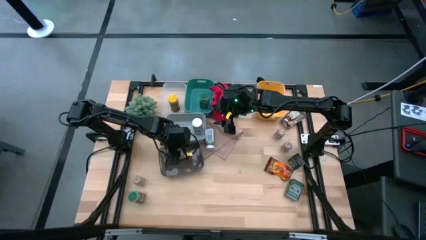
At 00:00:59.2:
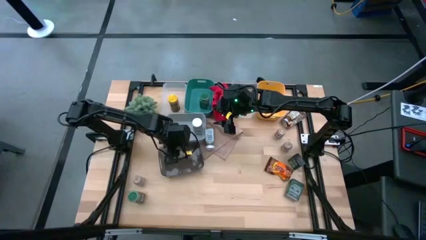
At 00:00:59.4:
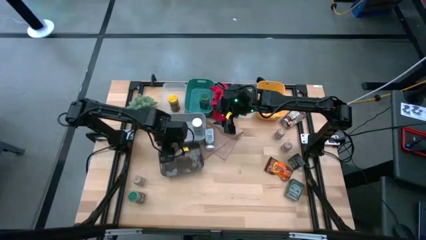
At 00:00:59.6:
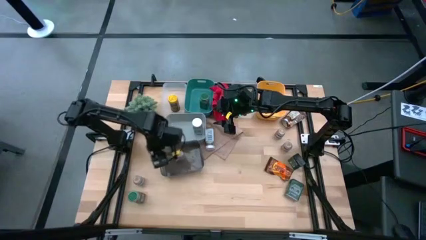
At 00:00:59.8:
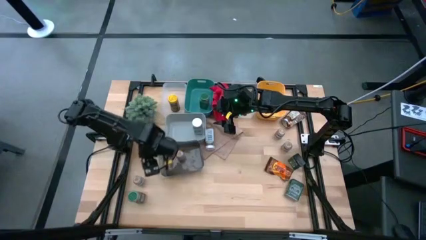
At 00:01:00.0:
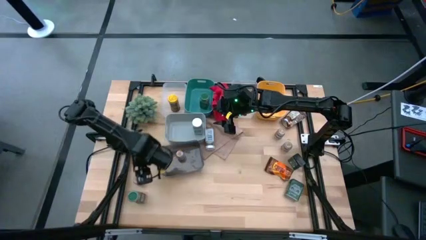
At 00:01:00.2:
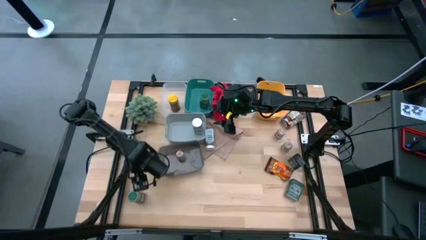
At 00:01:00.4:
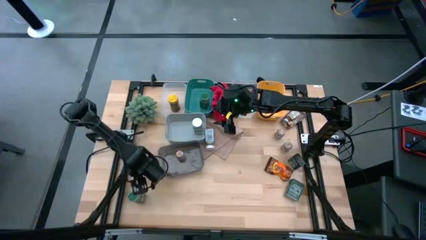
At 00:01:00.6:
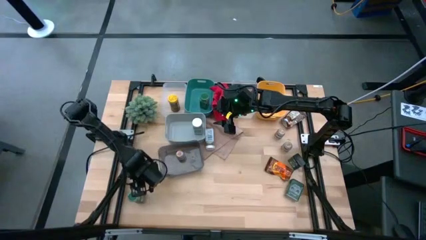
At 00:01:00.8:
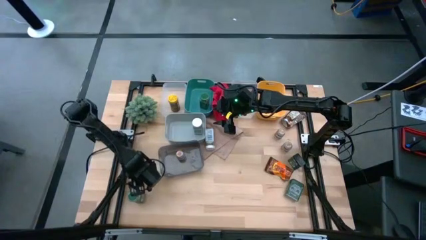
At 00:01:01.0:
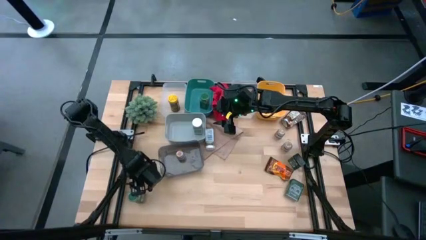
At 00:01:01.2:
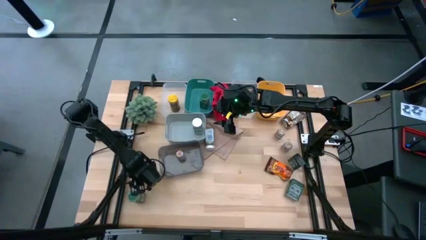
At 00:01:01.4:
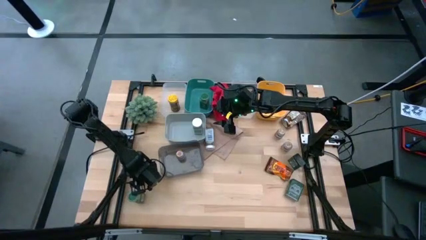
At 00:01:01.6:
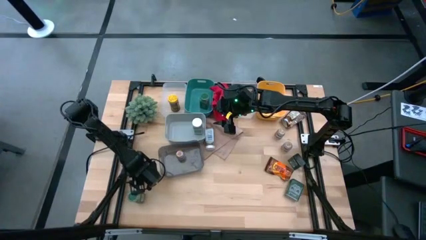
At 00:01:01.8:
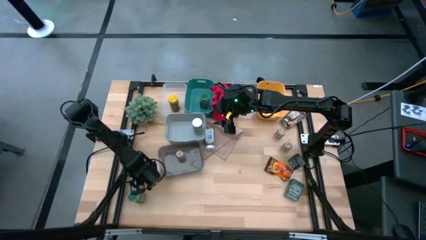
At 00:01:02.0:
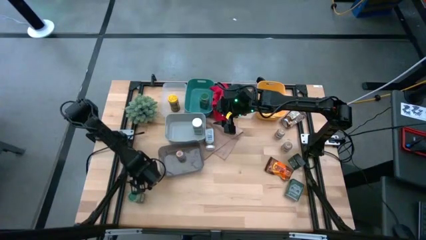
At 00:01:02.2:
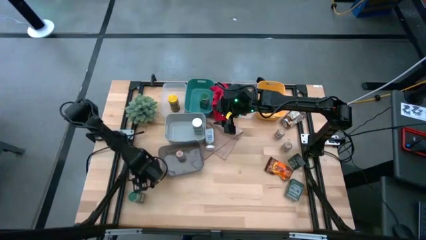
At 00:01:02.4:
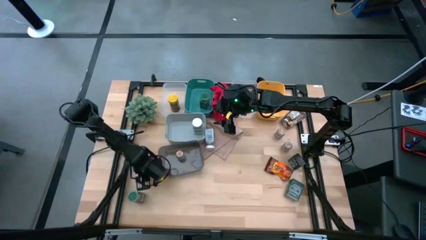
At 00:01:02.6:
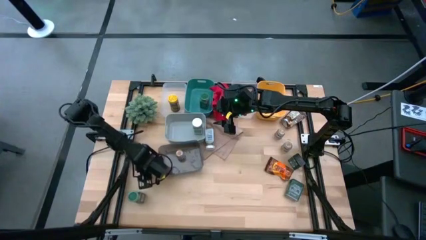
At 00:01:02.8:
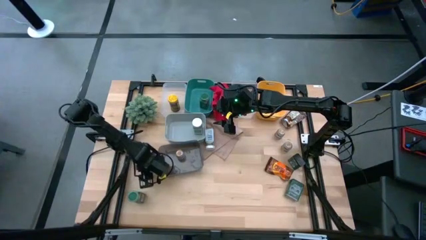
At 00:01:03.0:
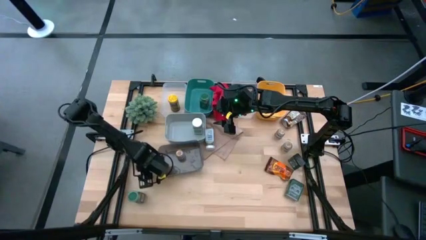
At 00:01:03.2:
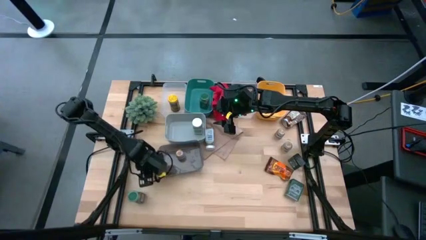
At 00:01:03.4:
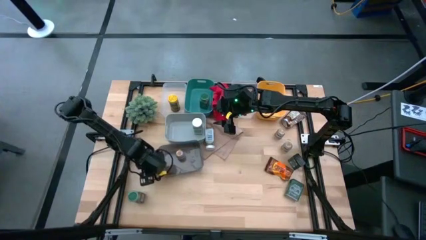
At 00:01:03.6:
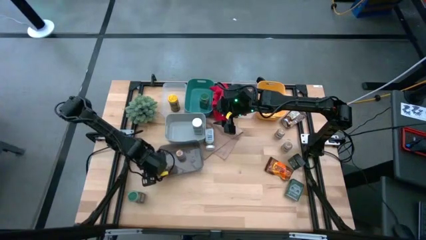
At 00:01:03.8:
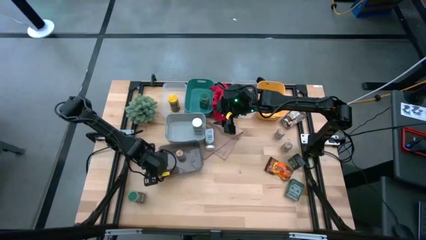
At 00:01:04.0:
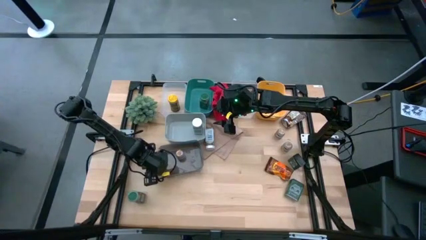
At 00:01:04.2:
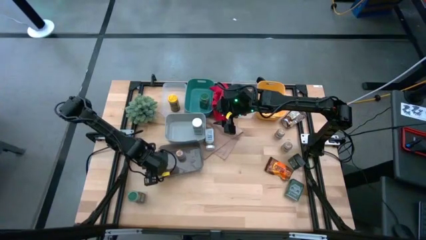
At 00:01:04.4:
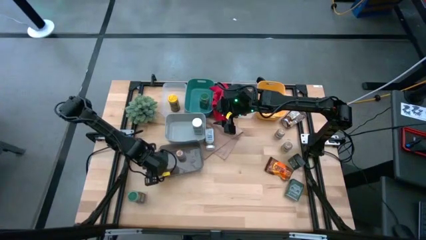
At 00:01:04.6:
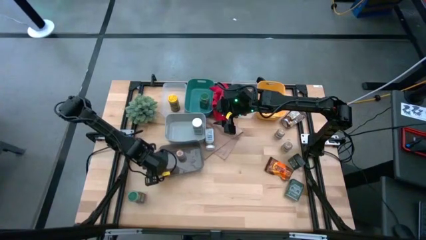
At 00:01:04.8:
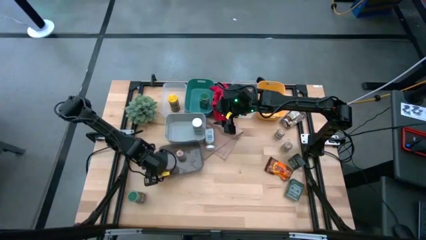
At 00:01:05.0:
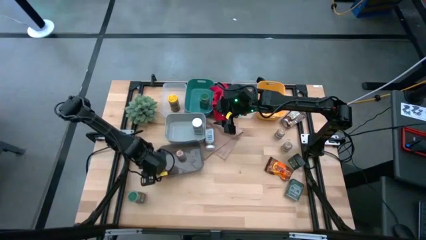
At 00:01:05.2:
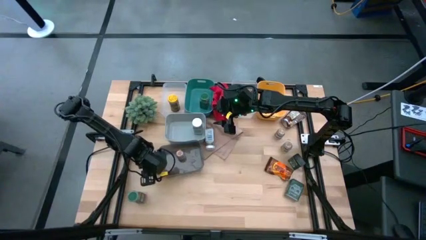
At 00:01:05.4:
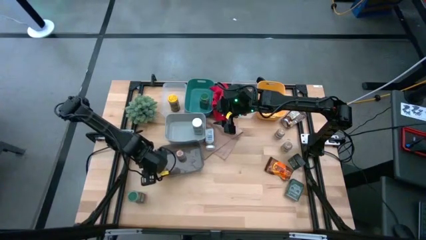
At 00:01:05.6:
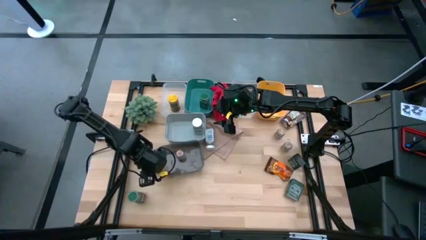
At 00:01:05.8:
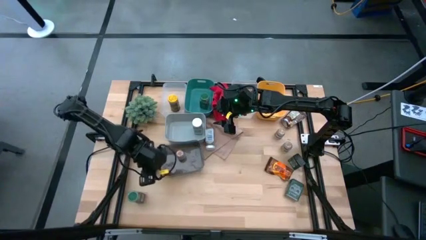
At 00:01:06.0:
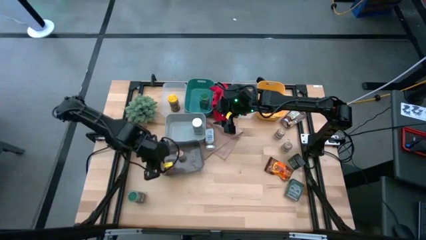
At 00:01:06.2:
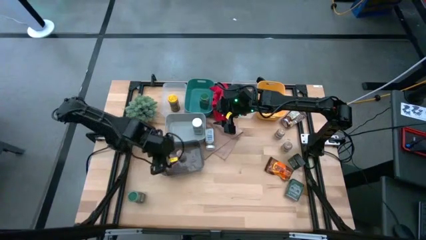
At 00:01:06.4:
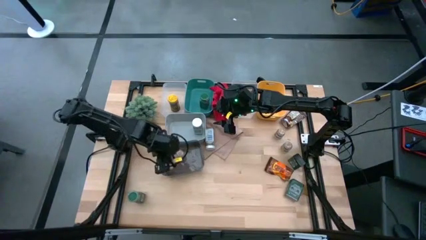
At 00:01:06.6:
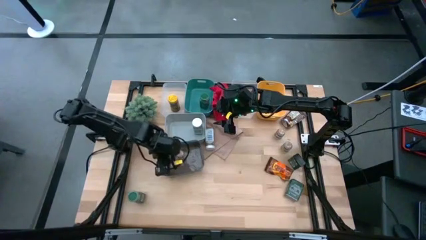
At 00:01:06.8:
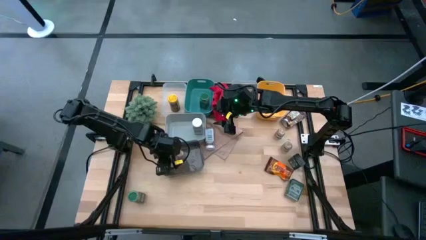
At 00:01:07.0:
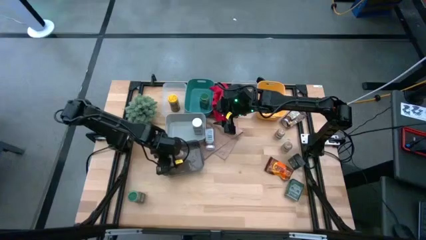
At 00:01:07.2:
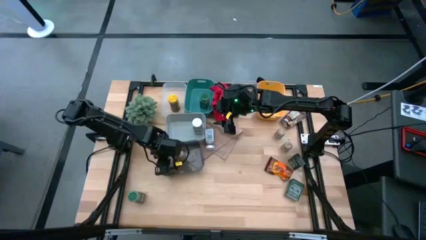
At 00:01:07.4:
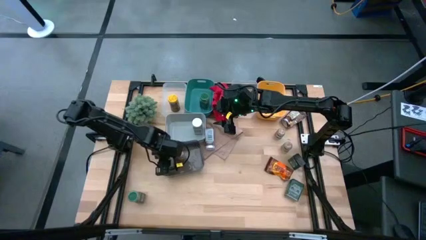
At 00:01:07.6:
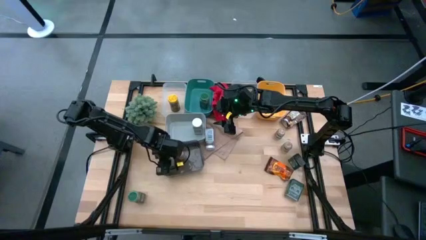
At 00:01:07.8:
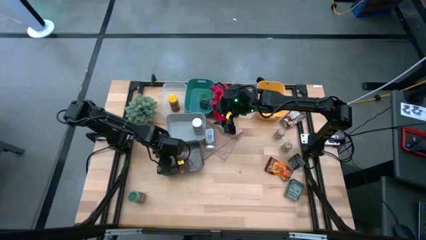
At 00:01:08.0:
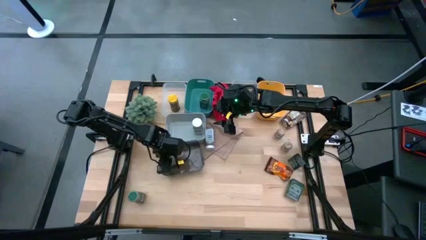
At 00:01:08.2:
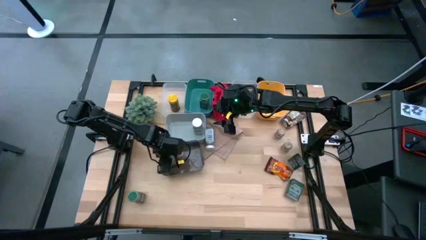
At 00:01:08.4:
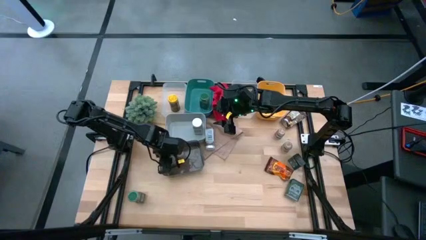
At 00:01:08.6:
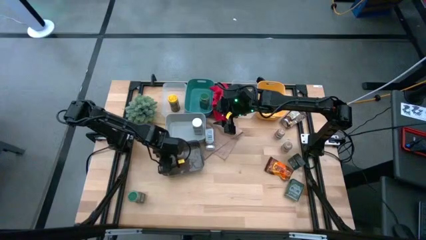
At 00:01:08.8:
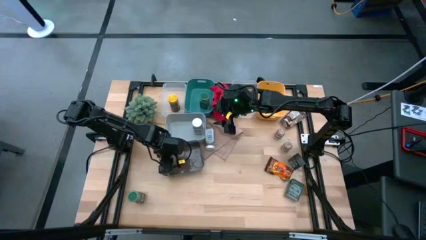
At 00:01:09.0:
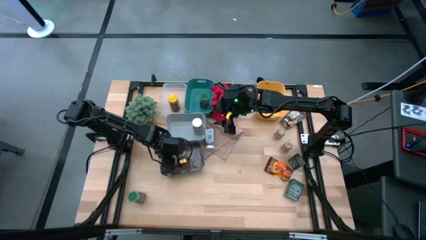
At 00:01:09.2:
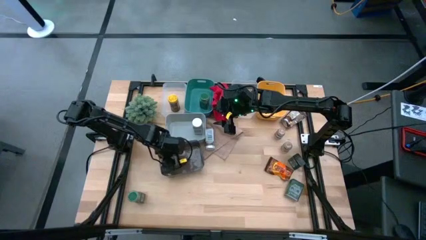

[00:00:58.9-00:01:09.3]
Task: Sort spices by type
Put the brown seasoning bottle into the black bin

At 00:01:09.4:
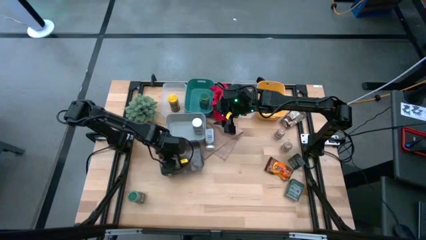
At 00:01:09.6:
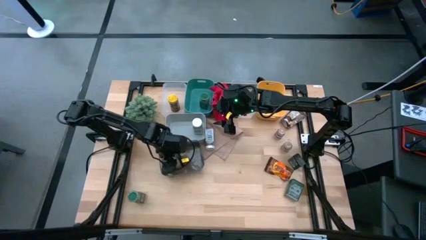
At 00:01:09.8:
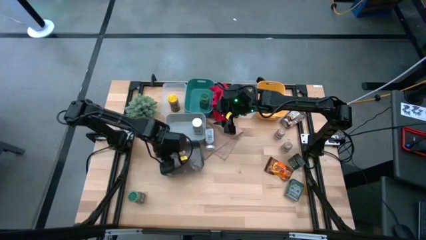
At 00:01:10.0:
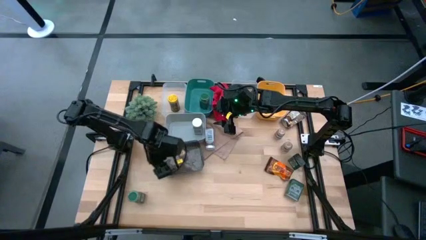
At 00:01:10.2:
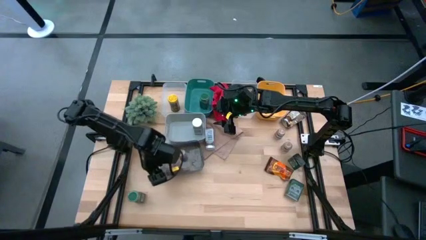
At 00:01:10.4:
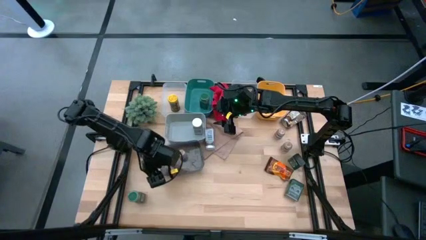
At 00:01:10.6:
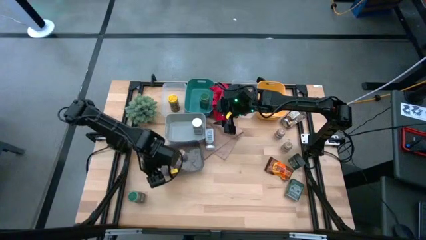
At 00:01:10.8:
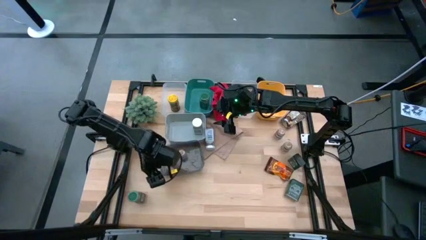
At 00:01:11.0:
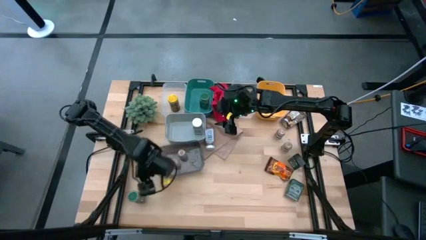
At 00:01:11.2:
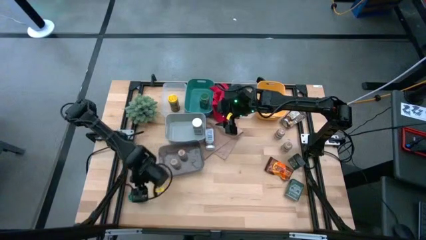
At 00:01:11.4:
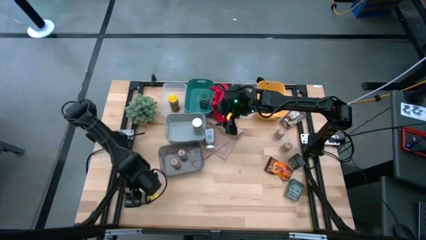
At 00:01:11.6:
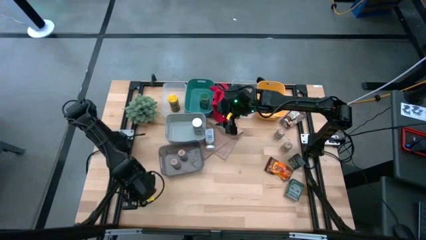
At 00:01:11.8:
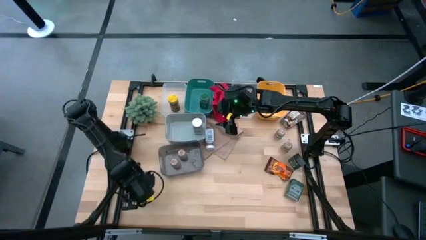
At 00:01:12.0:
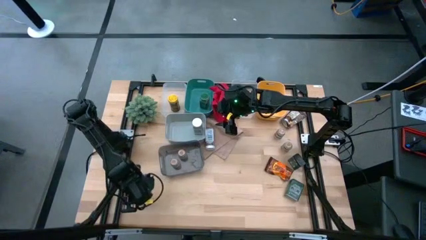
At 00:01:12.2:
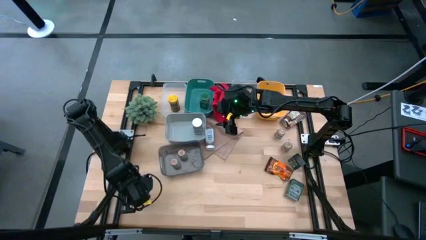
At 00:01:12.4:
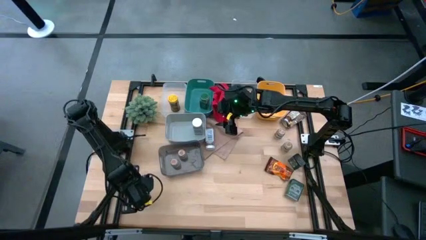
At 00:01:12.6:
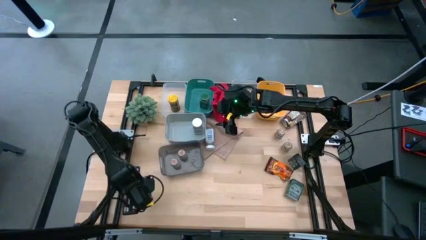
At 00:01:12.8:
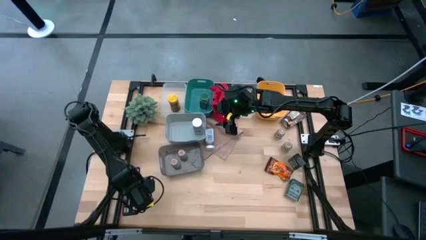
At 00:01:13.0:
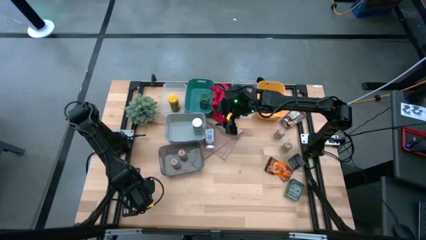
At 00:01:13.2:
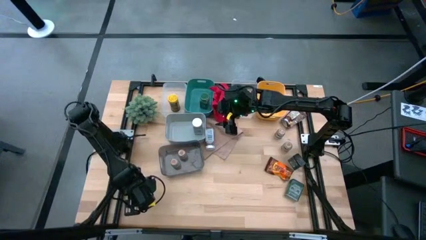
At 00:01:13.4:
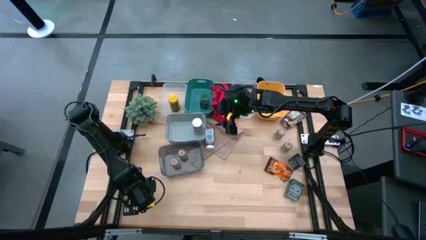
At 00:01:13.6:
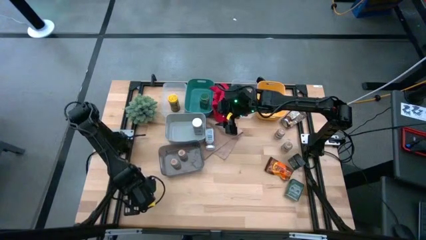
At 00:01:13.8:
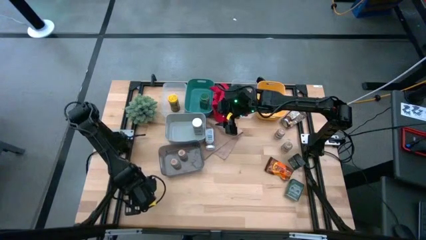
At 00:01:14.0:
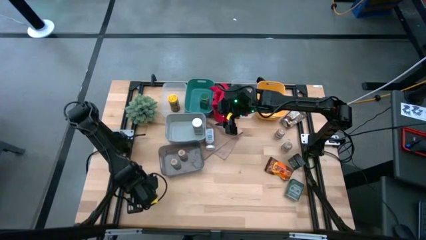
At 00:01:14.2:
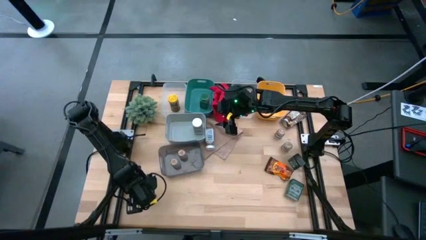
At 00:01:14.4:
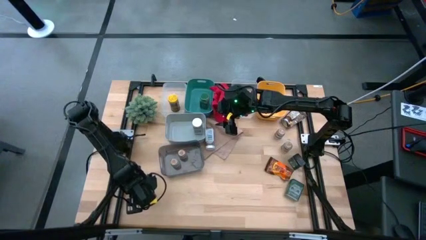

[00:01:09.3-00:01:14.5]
Put the green seasoning bottle into the green bin
